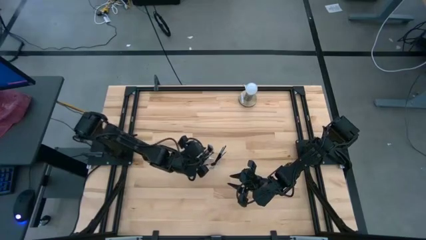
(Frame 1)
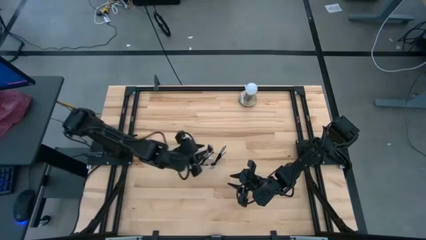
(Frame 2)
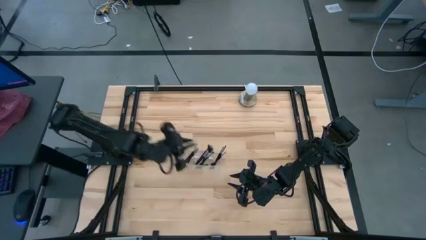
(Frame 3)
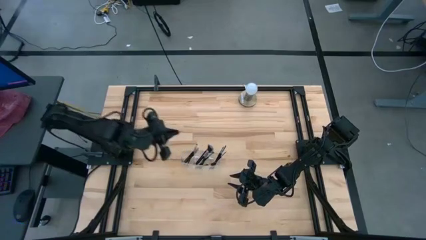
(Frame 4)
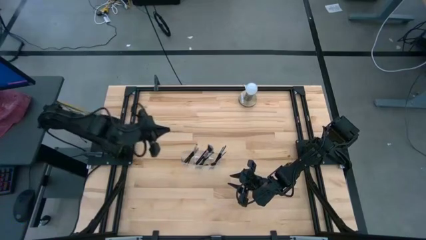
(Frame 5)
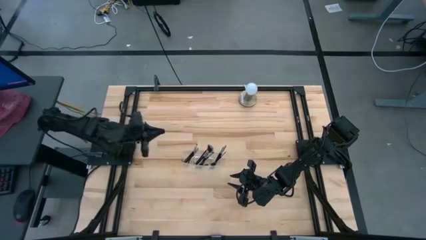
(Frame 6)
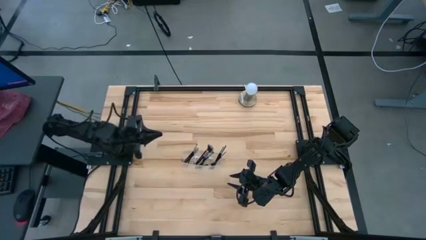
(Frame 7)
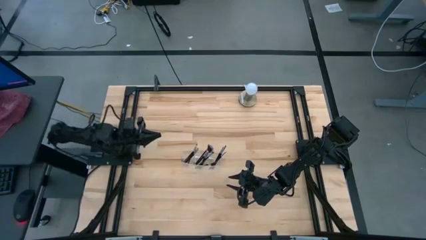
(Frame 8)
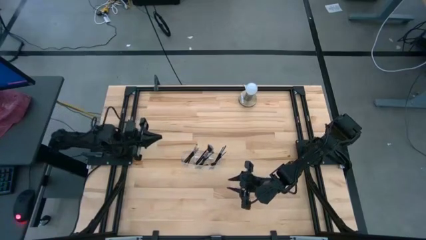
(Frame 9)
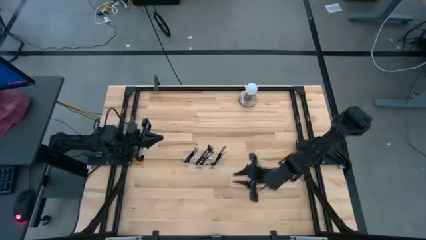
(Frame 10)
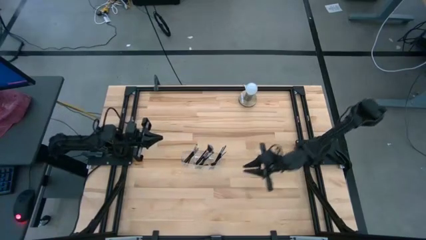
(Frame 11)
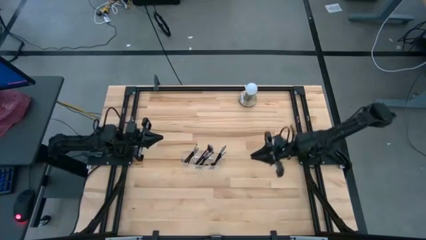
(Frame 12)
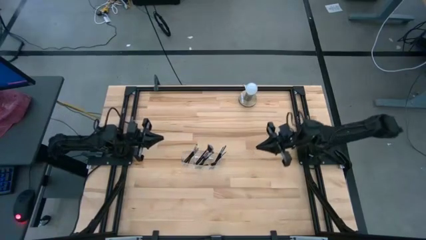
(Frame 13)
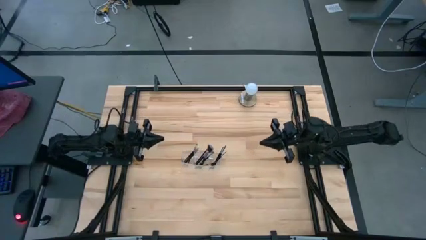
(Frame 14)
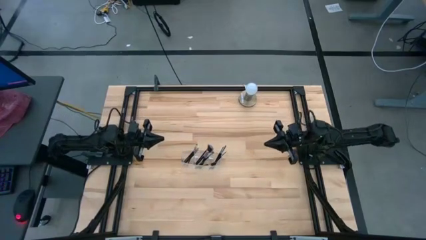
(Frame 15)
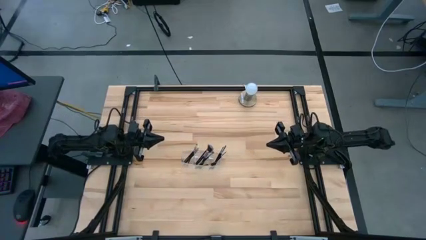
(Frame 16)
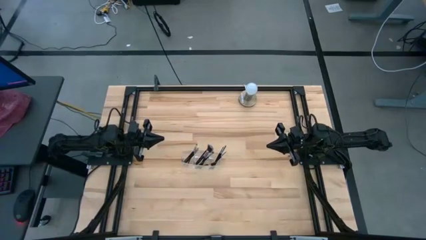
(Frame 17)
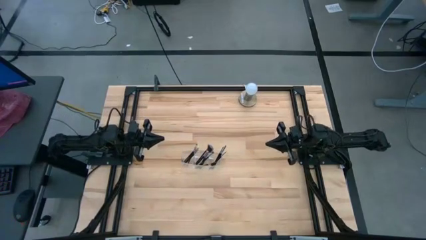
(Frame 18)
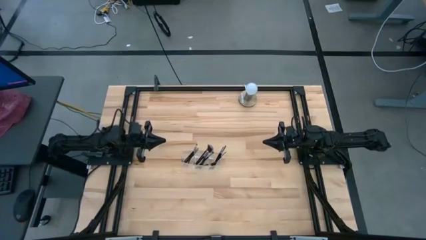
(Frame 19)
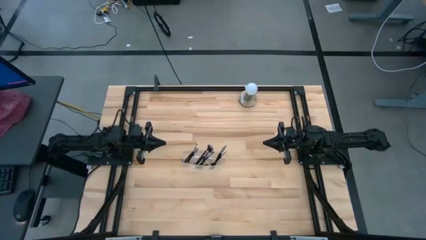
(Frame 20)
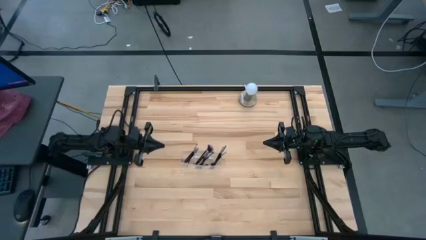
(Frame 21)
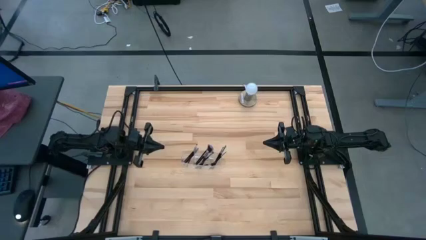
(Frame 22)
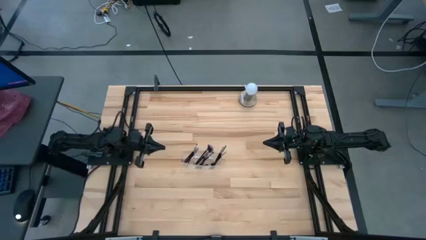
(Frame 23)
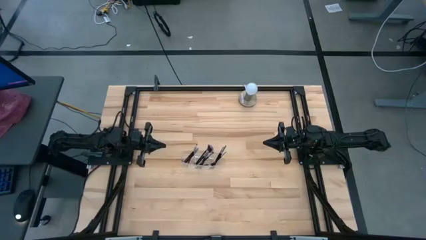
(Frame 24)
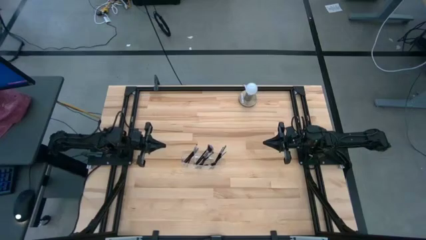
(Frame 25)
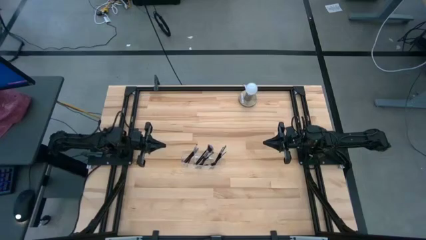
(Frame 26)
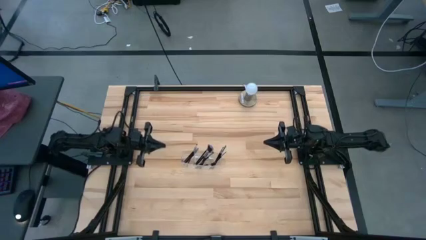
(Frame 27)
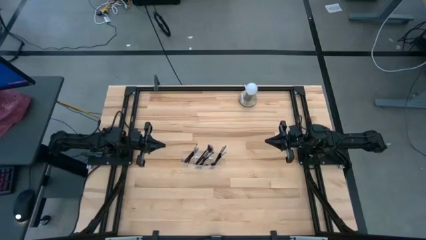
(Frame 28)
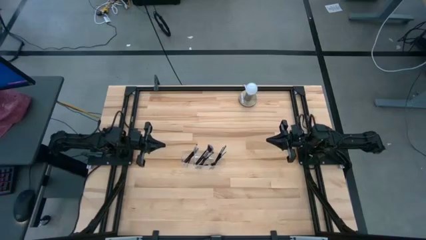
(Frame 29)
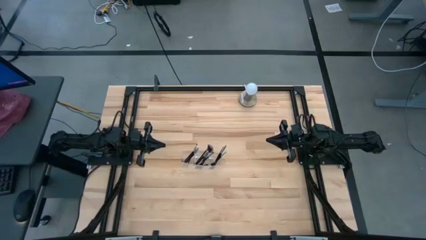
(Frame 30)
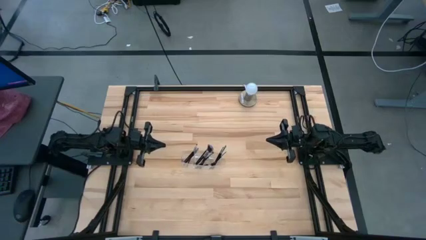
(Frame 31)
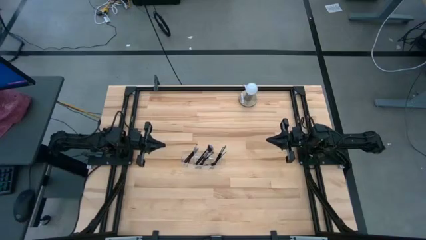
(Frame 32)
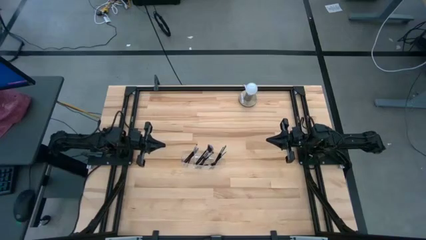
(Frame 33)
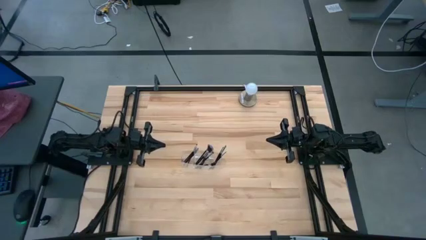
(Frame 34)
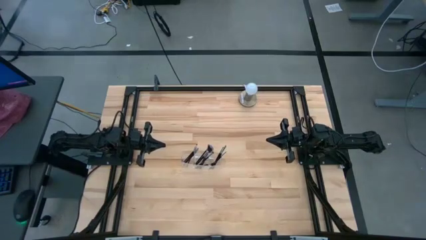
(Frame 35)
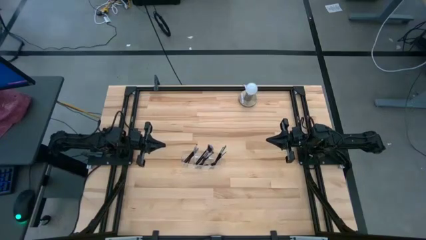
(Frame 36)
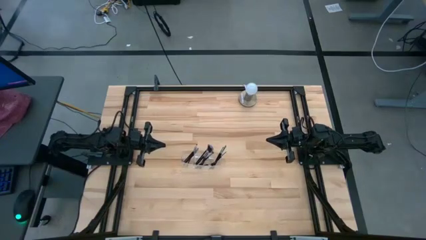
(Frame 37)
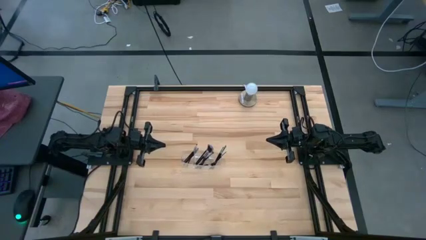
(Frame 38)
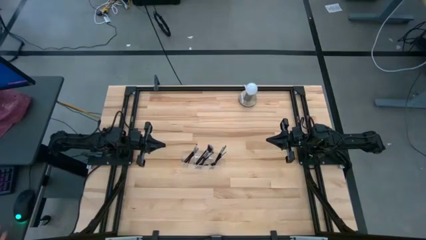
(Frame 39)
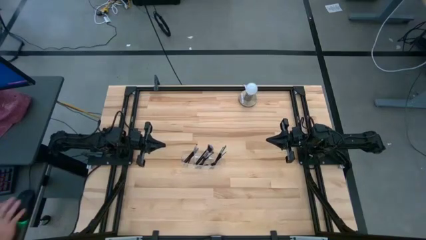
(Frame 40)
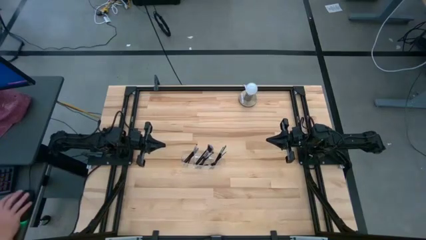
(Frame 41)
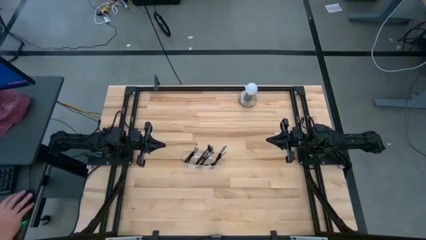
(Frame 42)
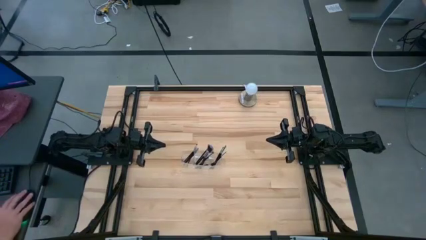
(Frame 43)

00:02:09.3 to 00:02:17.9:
Task: Put items in baskets/containers
Return to Home Position

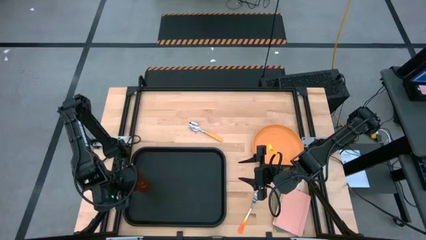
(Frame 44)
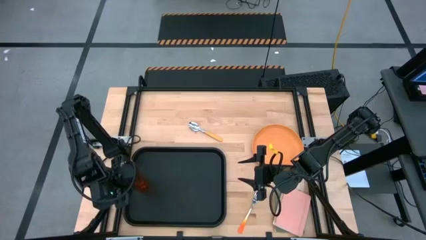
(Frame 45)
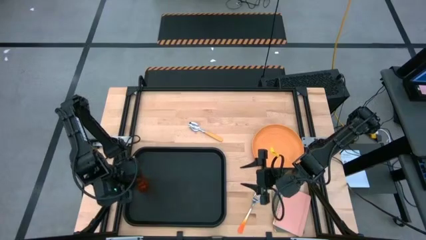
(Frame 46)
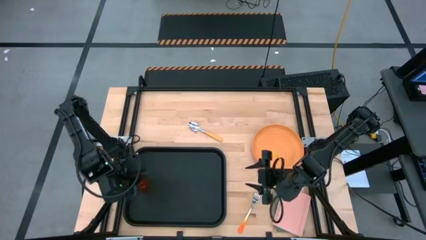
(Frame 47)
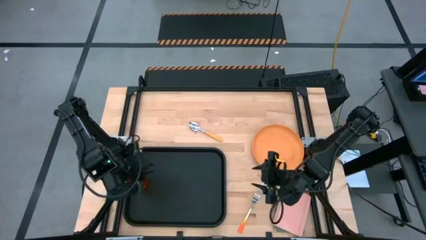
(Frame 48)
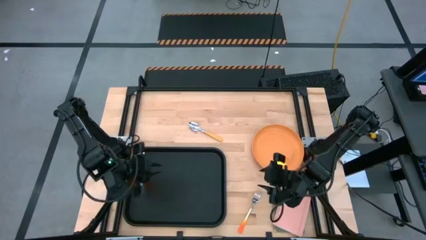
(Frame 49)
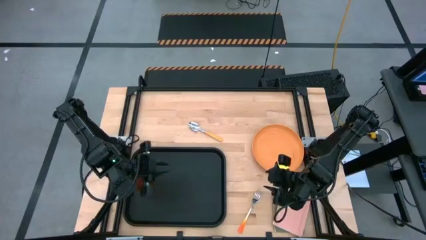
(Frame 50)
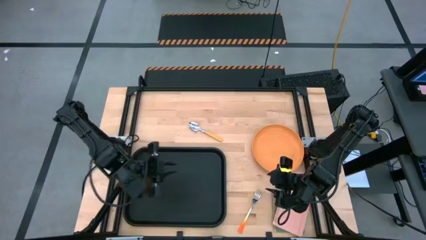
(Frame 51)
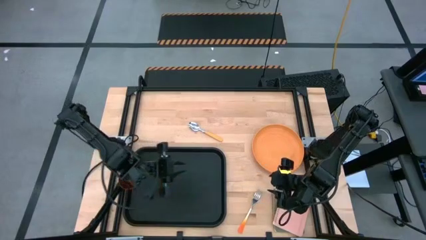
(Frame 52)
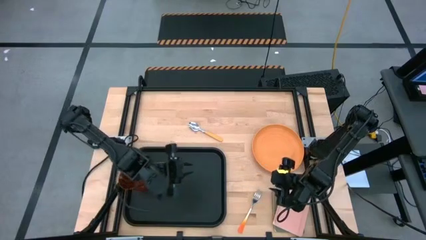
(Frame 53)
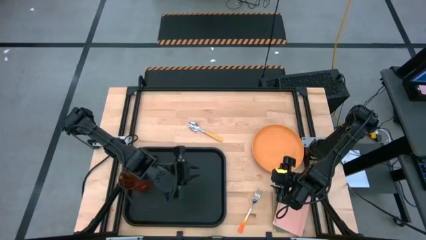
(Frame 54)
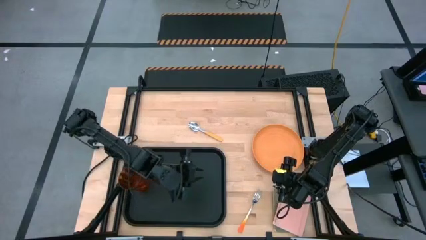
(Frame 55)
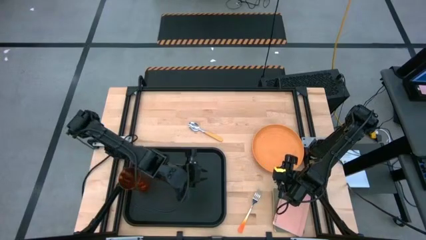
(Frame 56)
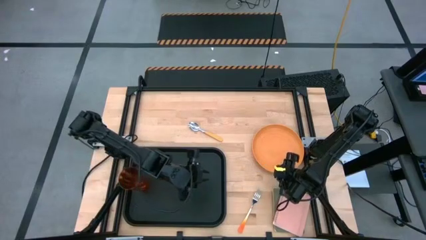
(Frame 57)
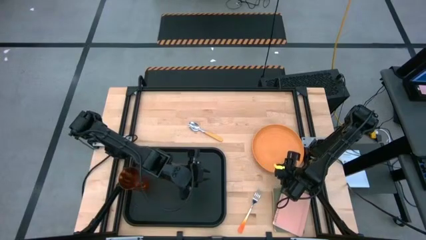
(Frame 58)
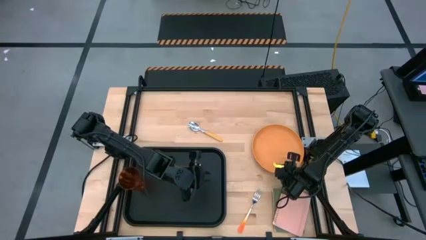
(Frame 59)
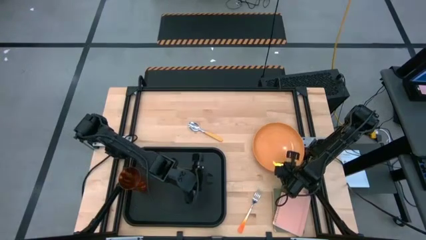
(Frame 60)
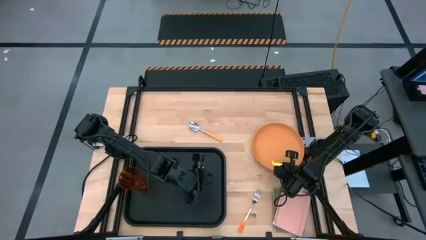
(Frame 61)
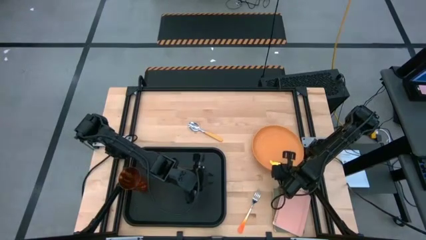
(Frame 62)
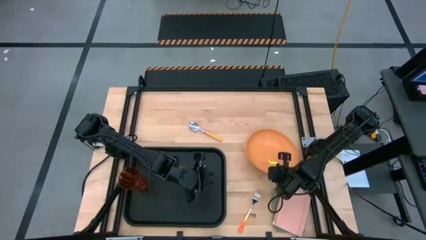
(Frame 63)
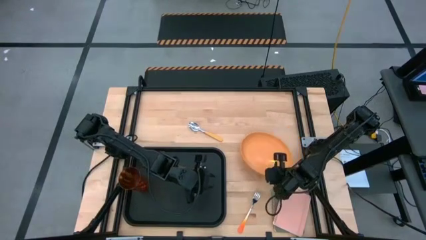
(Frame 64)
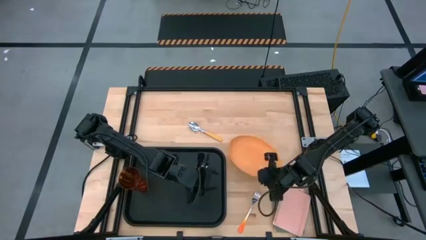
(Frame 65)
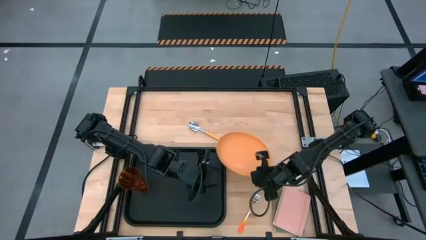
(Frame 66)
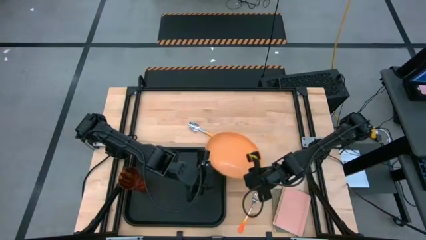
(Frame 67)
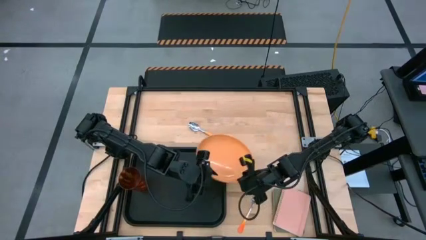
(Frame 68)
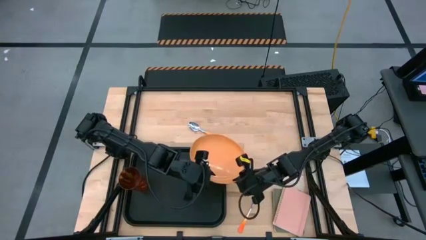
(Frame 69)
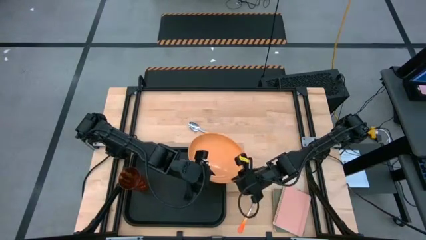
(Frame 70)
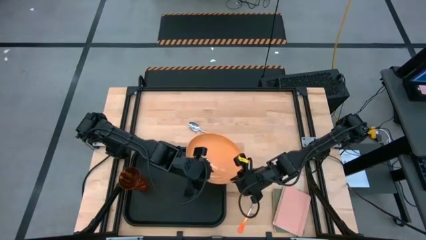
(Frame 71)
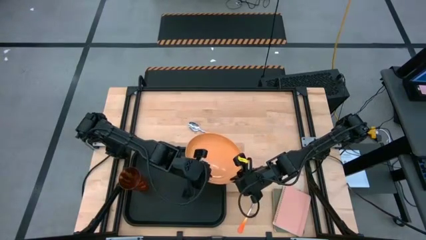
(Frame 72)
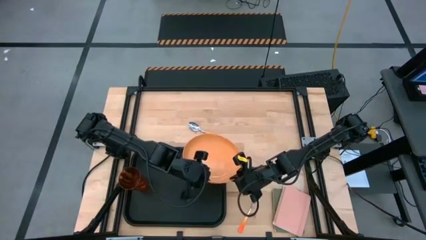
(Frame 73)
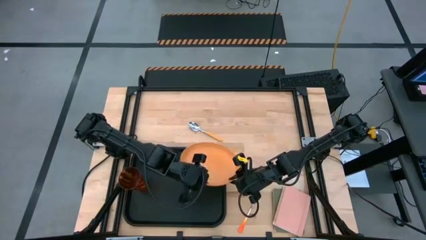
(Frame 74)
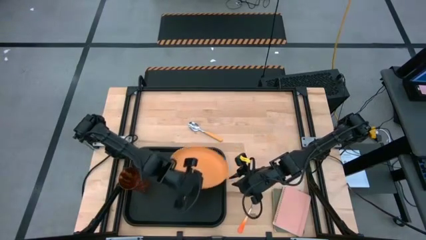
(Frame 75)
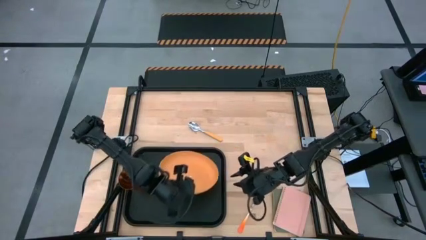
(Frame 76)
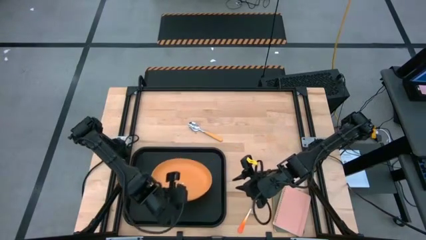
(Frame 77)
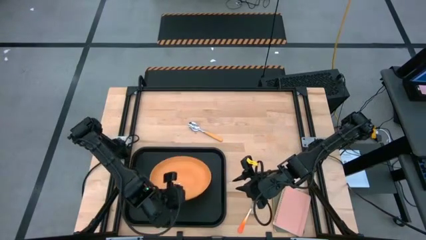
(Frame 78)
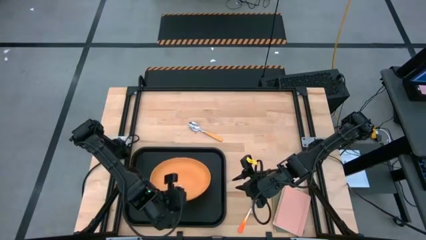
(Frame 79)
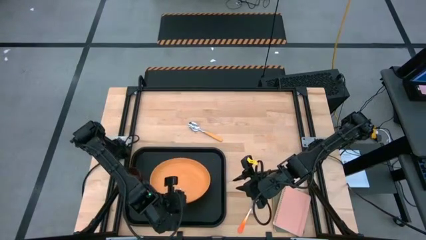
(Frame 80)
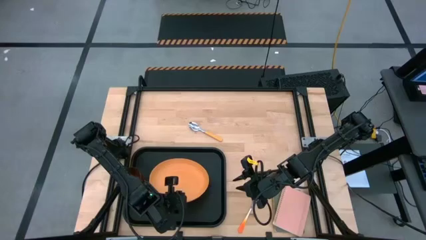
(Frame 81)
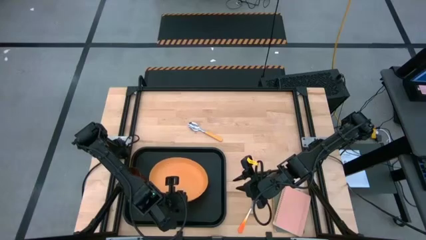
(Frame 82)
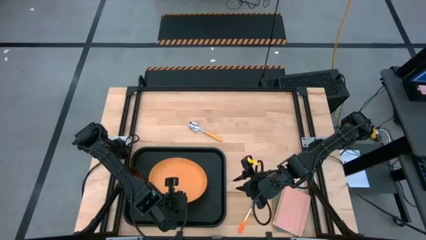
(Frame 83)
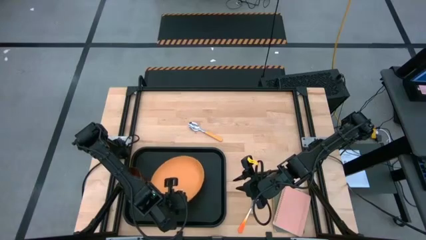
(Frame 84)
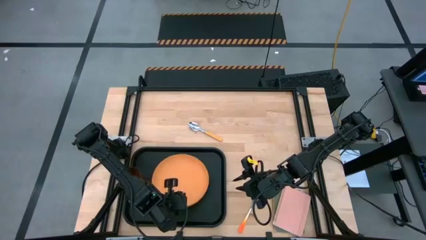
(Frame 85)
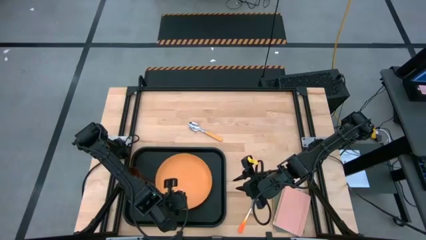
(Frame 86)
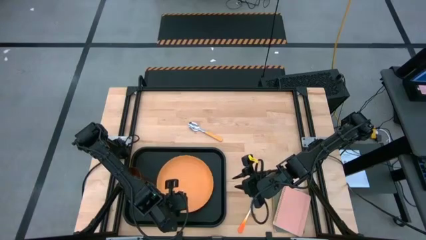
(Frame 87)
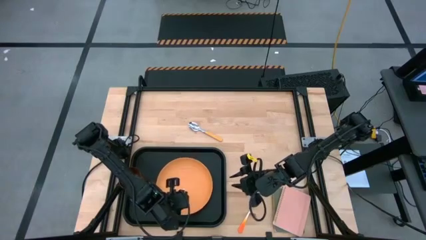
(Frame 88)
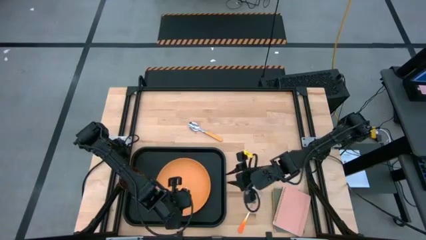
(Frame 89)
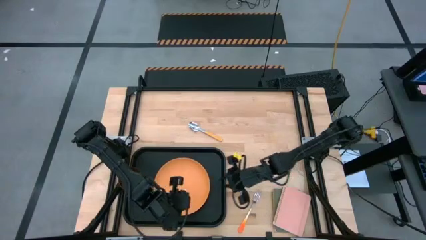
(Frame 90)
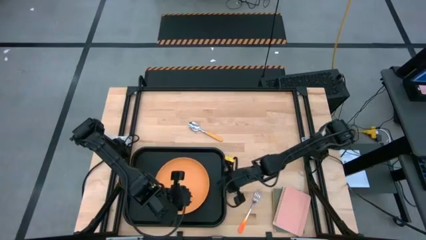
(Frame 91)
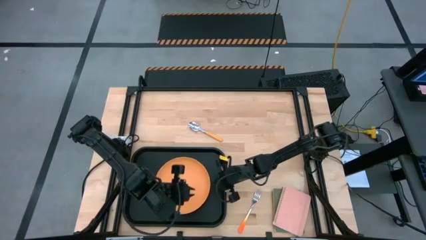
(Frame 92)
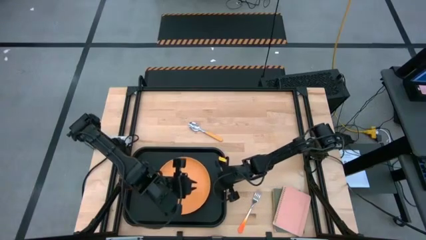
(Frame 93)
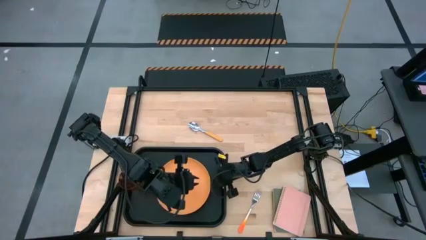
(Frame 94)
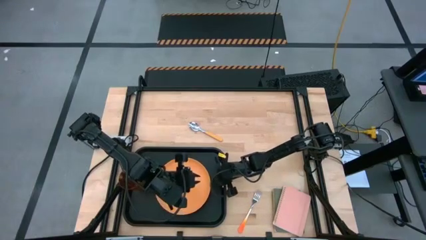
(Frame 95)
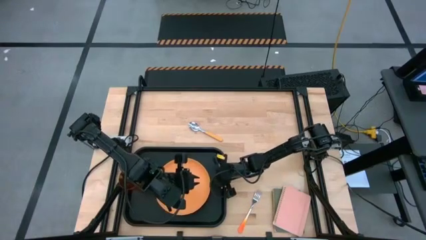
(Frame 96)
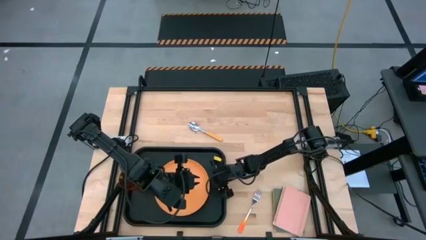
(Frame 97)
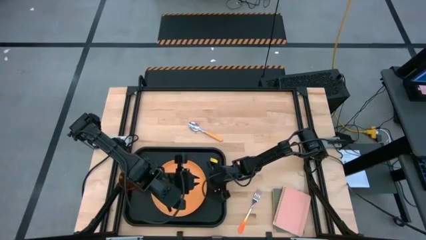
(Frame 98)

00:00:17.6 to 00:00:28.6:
Task: Pick and place plate/cup/fork/spoon on tray
Put the orange plate on the black tray
